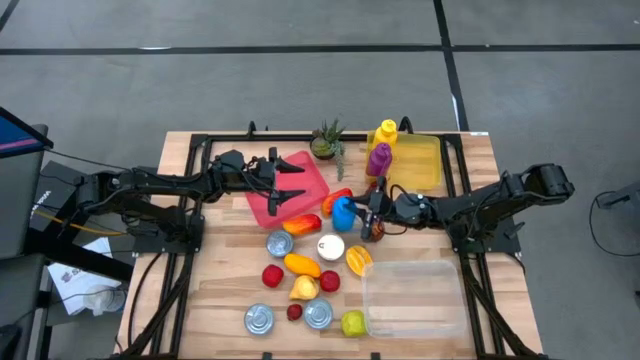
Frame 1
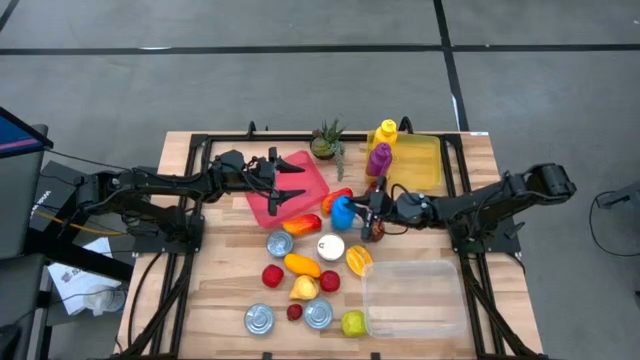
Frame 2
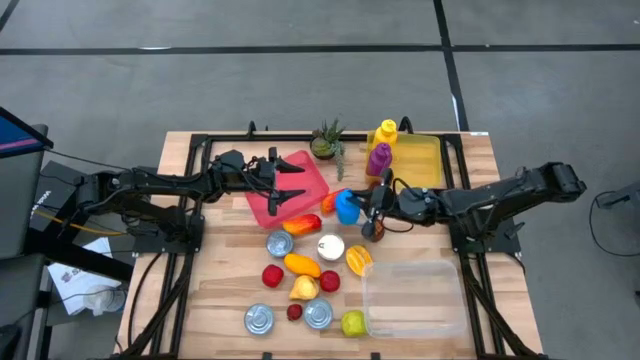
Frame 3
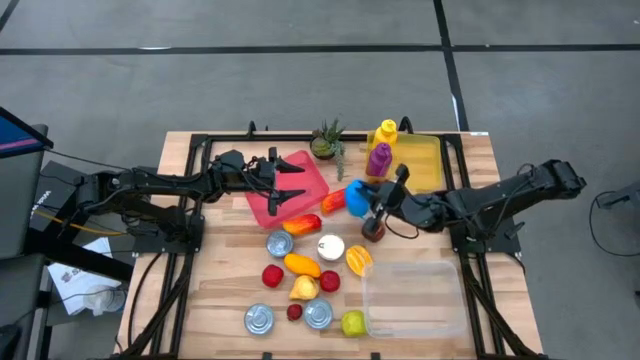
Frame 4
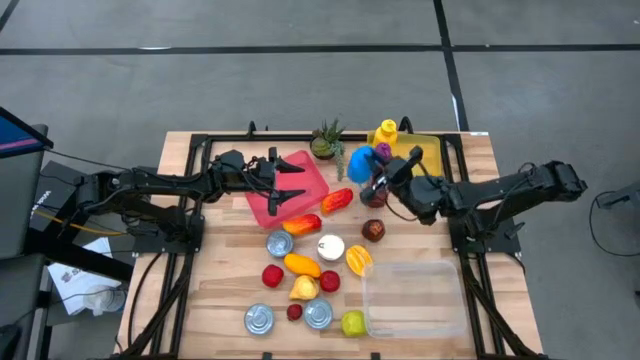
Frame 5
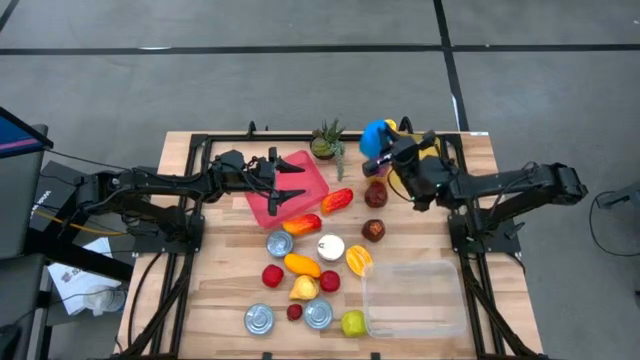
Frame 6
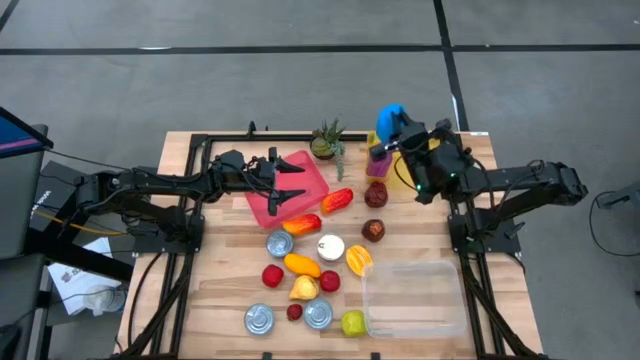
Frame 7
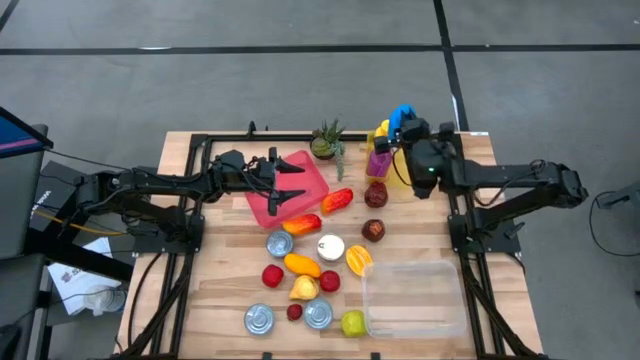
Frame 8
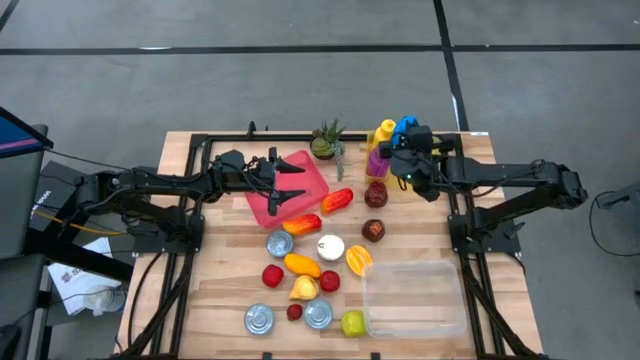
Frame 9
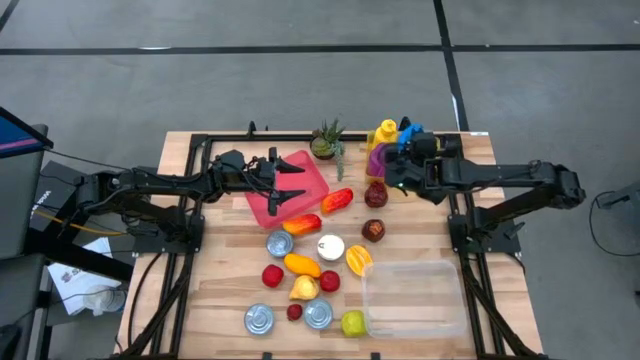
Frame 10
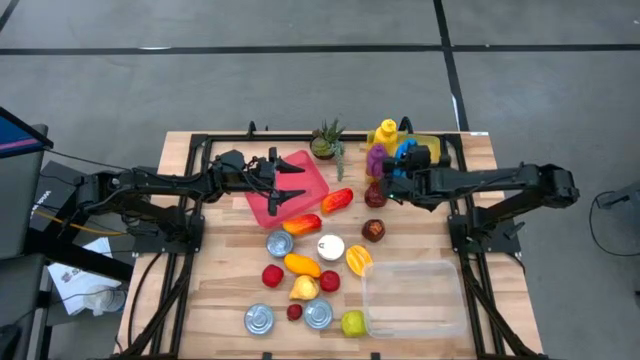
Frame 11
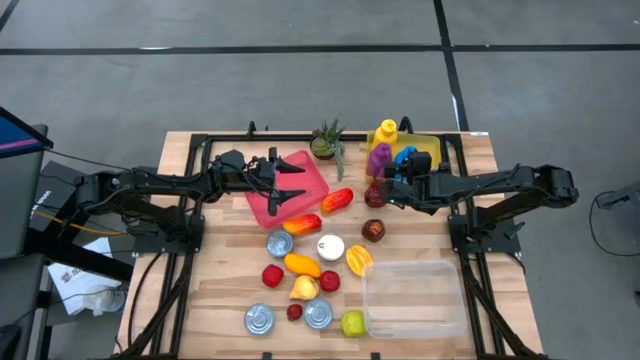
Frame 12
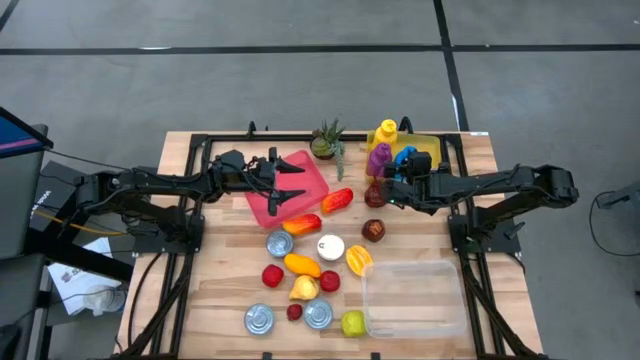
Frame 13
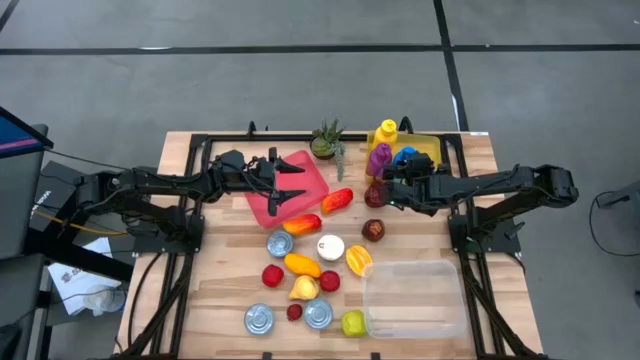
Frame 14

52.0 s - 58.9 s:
Task: Pick & Place Food Item
Put the blue water bottle into the yellow bin

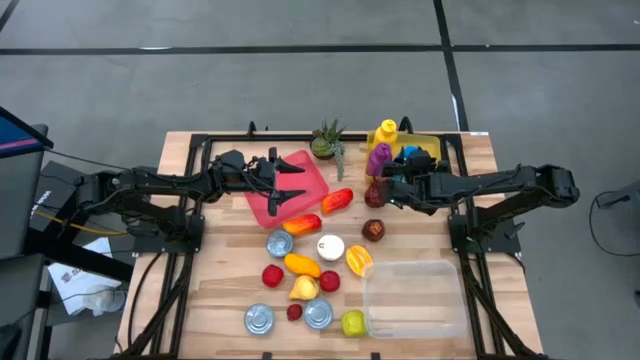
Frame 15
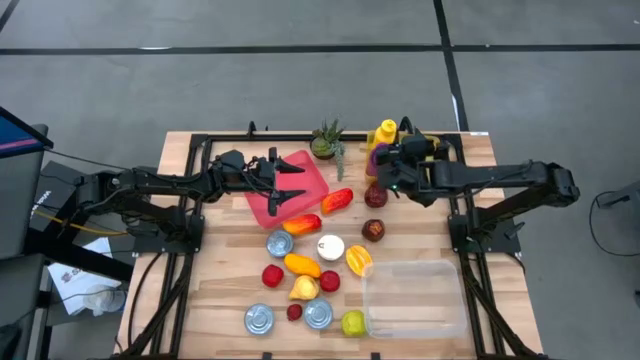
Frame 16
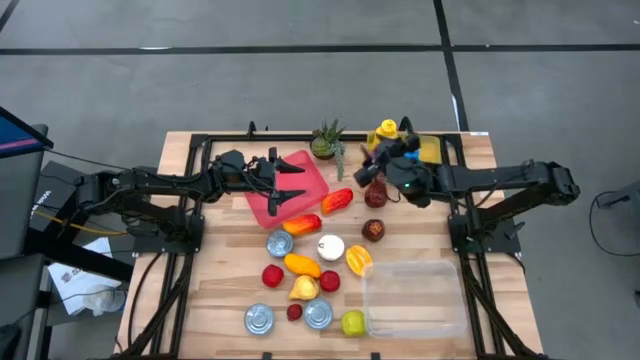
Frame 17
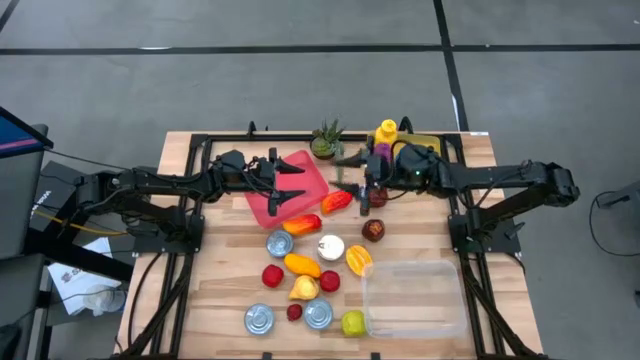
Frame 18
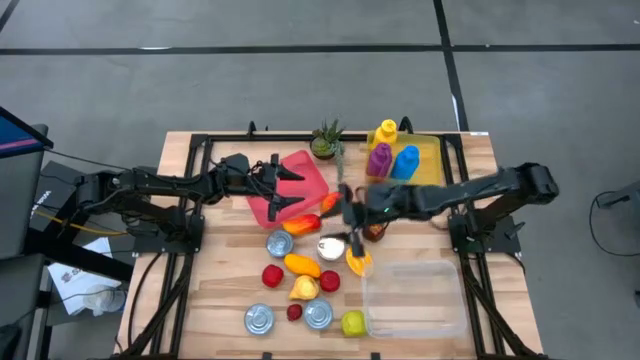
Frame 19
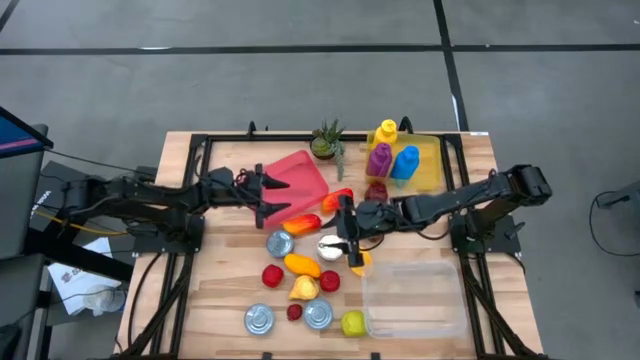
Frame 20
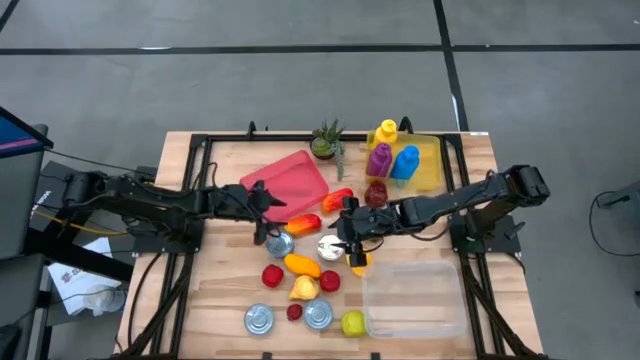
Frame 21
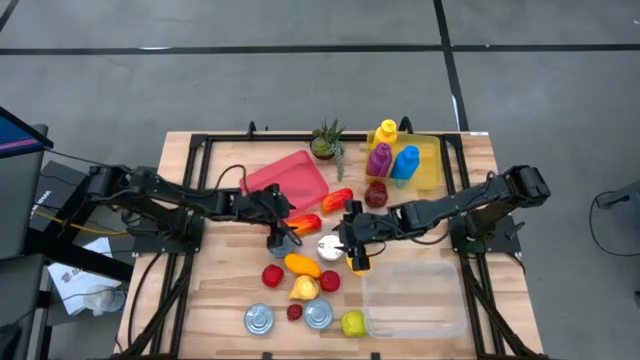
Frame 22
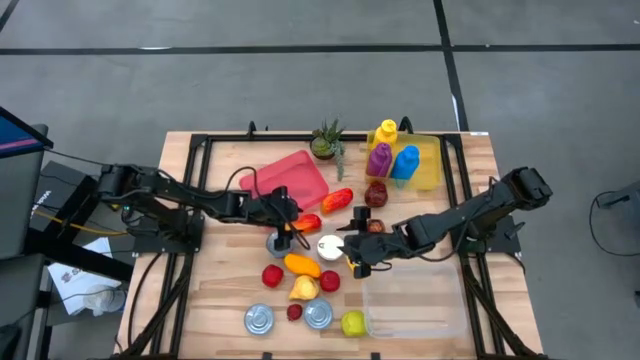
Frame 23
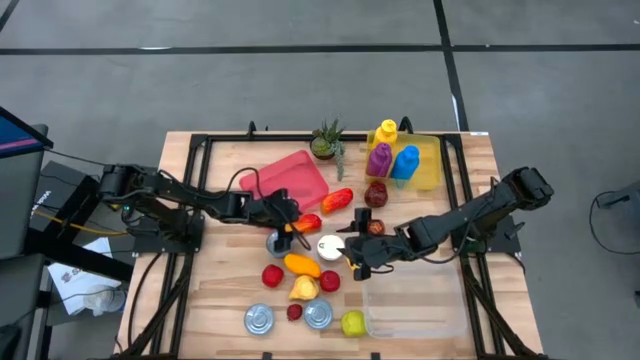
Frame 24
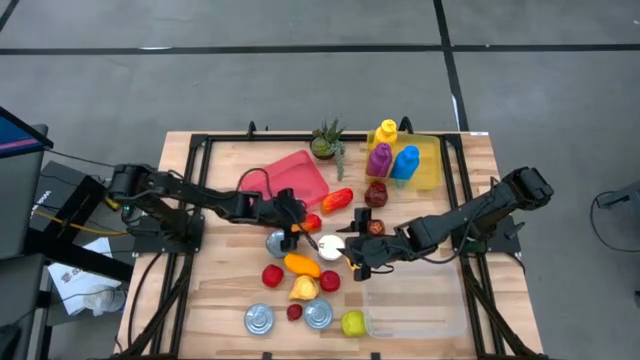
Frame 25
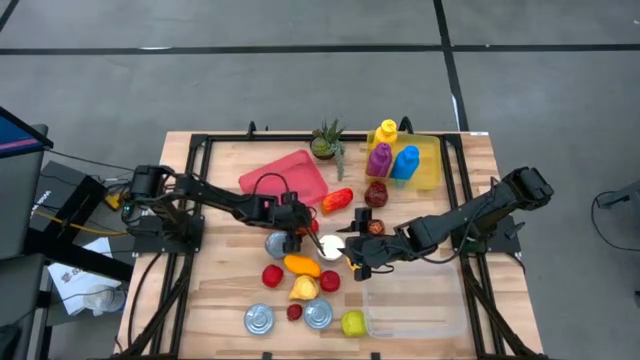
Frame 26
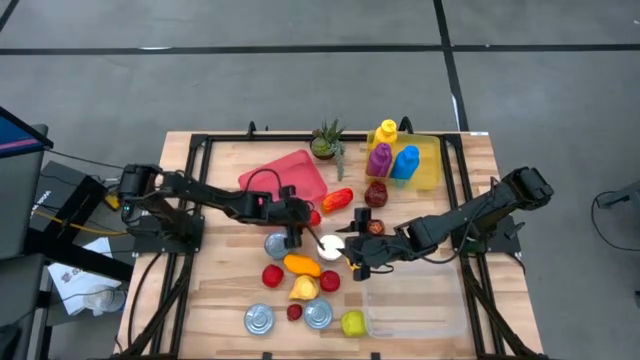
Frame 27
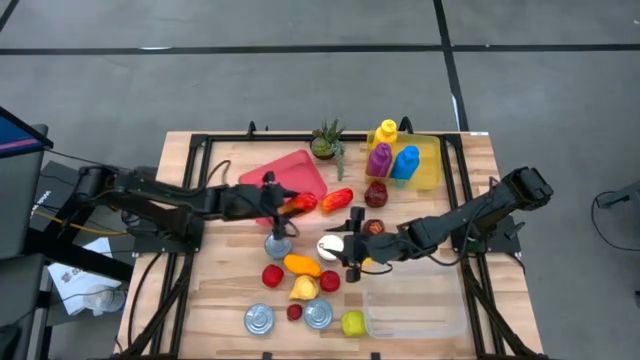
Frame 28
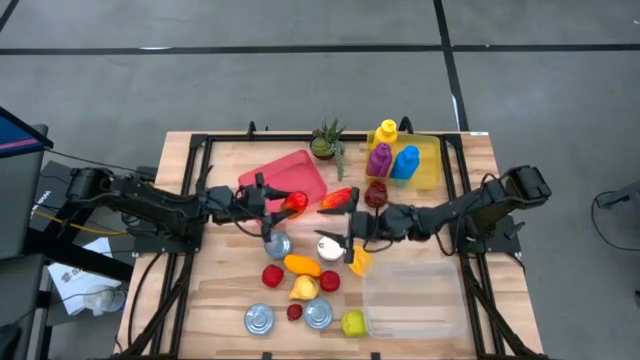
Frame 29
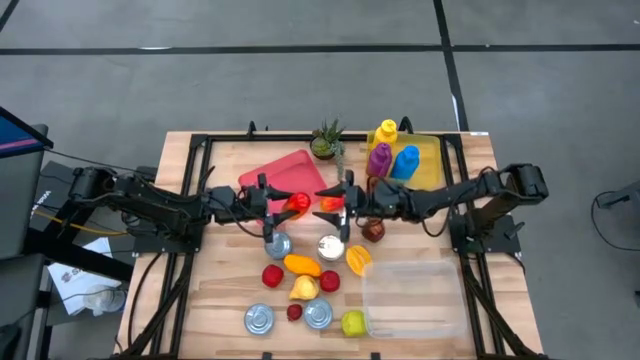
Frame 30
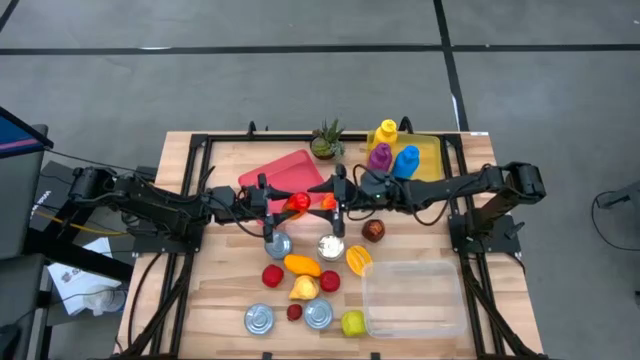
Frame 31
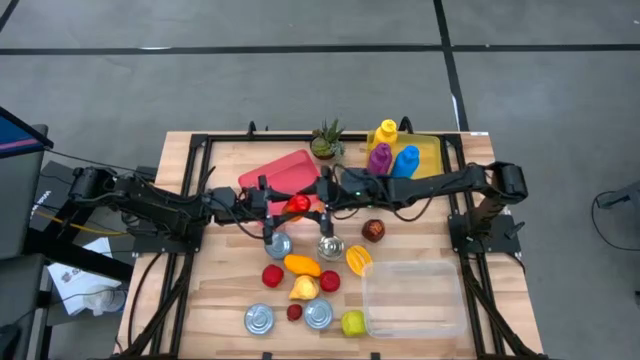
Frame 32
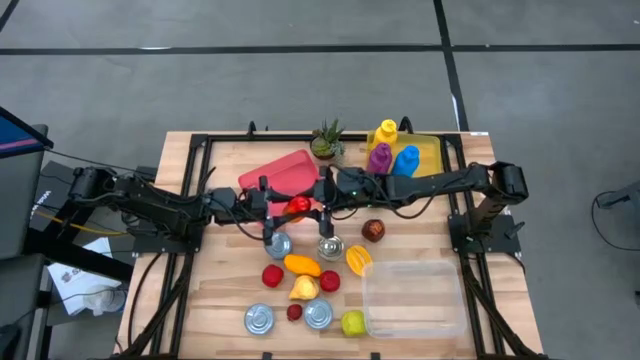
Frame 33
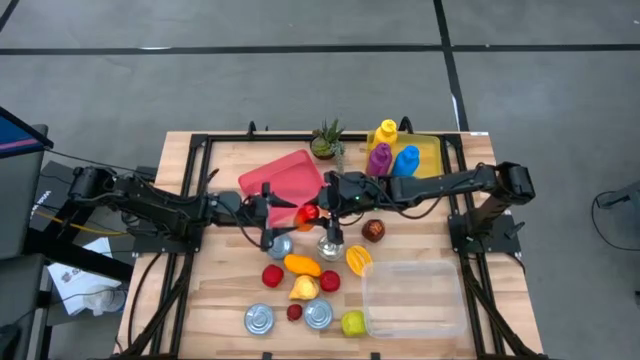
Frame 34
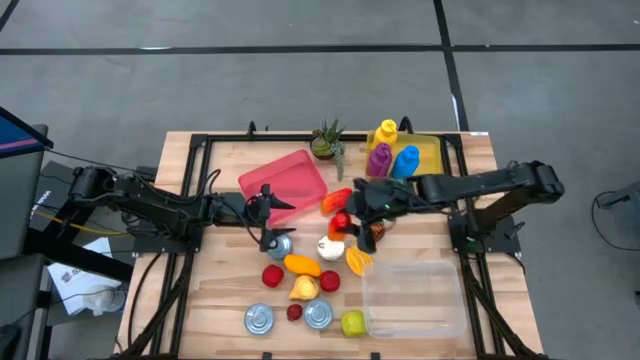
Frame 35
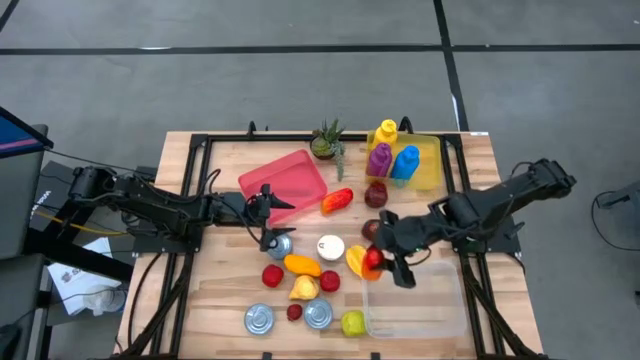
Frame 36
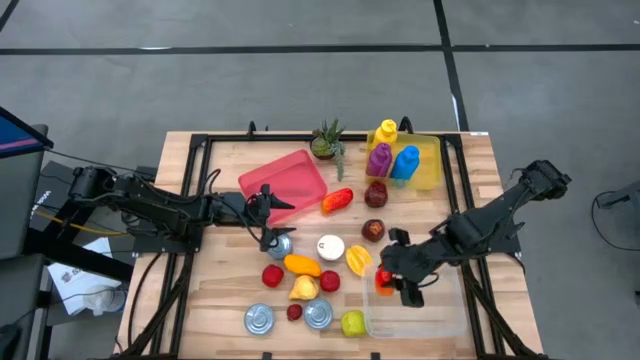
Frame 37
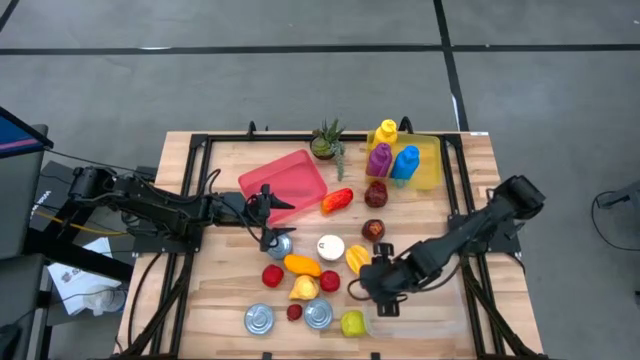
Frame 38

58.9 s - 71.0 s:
Put the bottom red mango into the transparent bin
